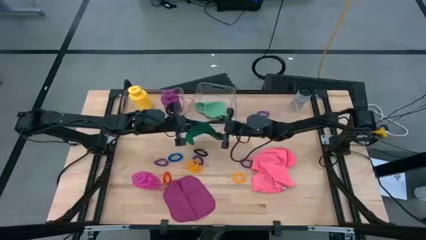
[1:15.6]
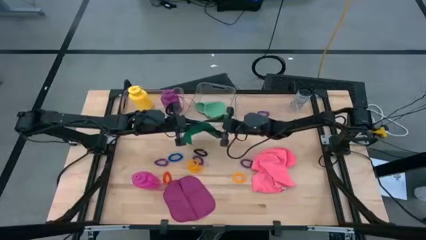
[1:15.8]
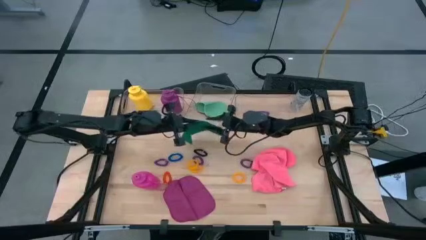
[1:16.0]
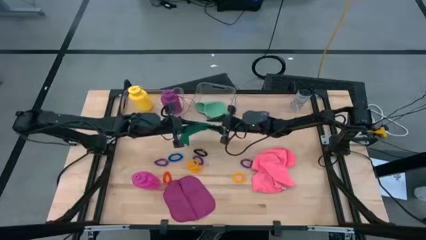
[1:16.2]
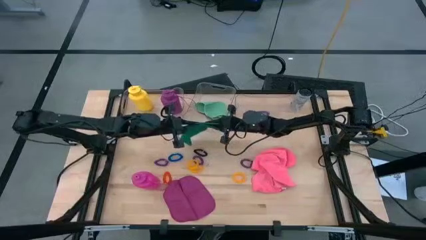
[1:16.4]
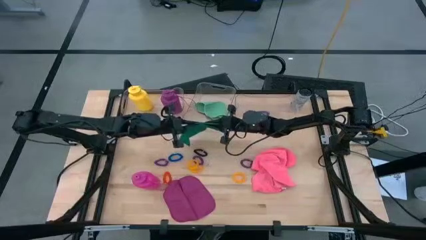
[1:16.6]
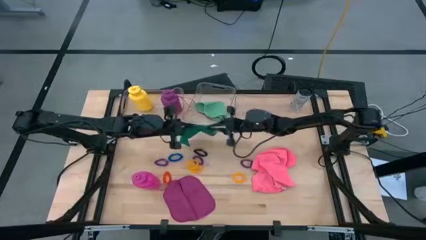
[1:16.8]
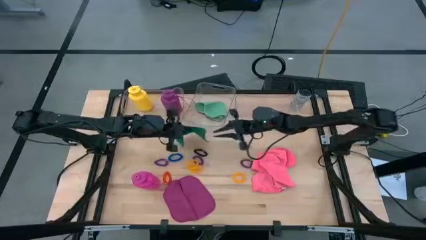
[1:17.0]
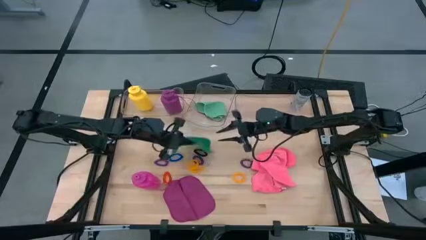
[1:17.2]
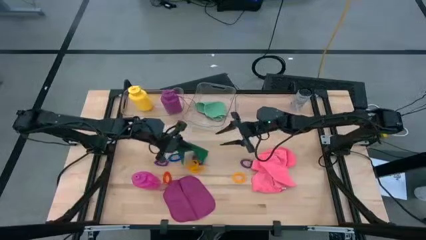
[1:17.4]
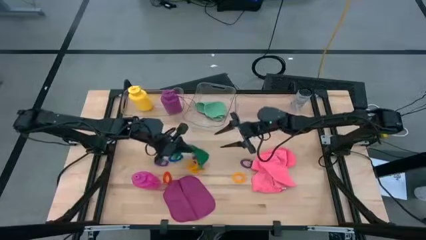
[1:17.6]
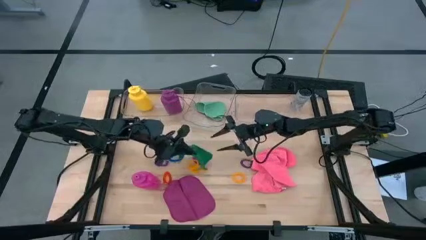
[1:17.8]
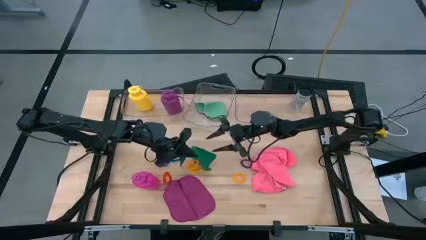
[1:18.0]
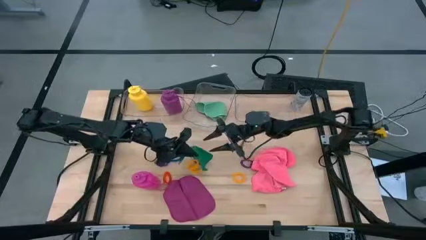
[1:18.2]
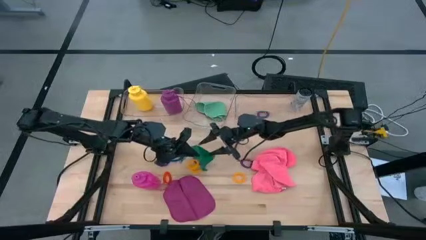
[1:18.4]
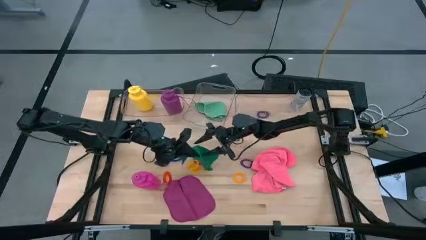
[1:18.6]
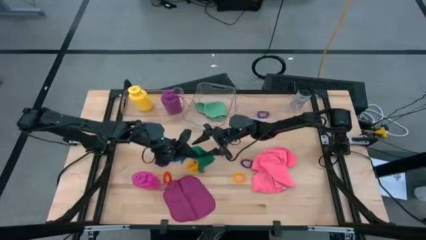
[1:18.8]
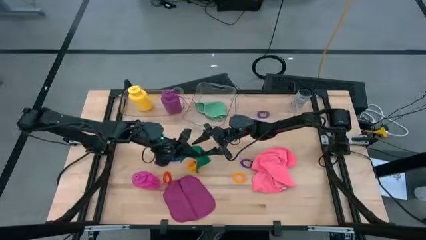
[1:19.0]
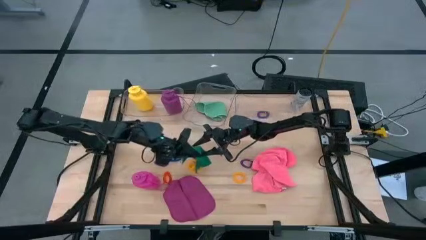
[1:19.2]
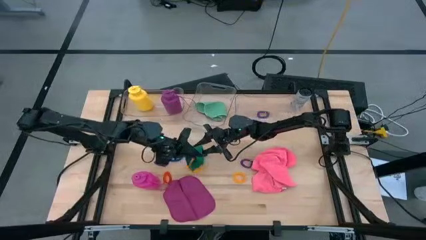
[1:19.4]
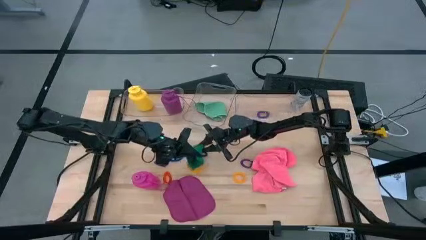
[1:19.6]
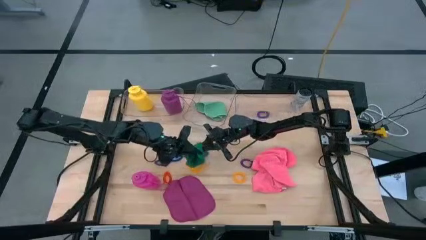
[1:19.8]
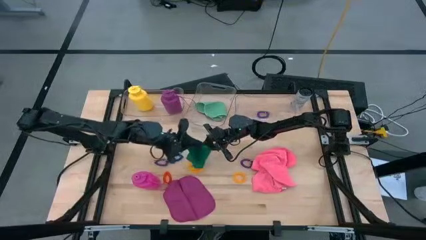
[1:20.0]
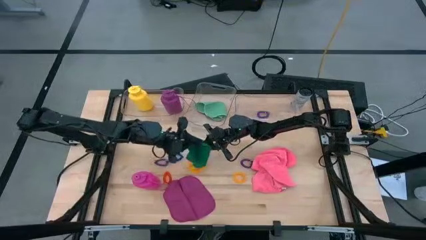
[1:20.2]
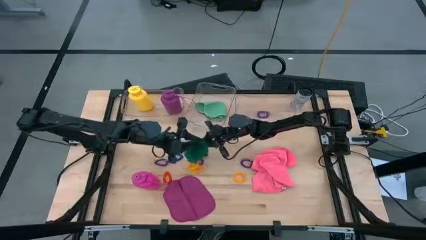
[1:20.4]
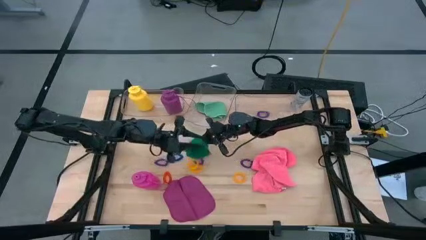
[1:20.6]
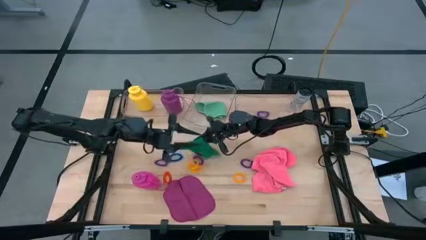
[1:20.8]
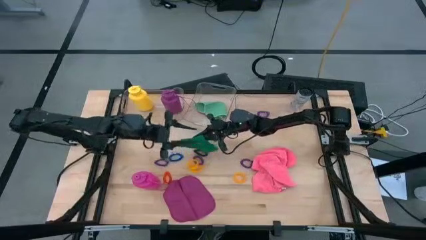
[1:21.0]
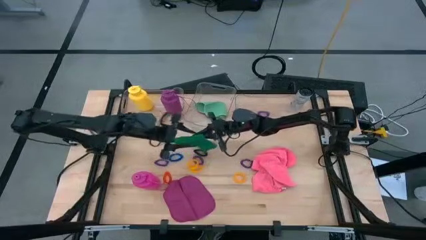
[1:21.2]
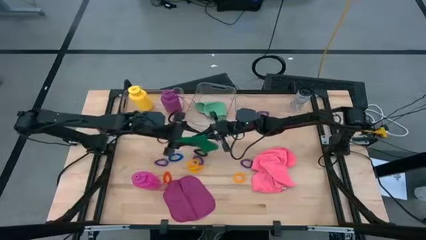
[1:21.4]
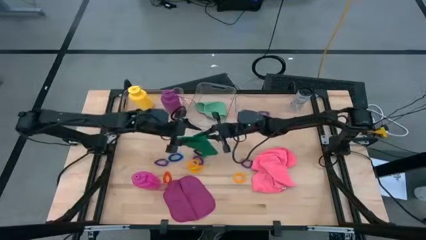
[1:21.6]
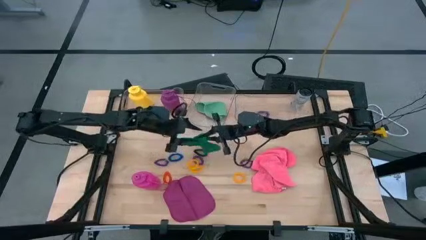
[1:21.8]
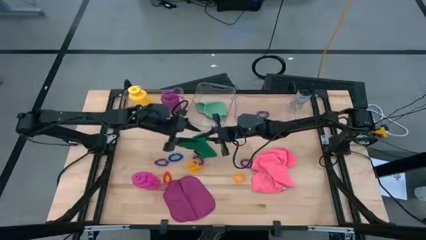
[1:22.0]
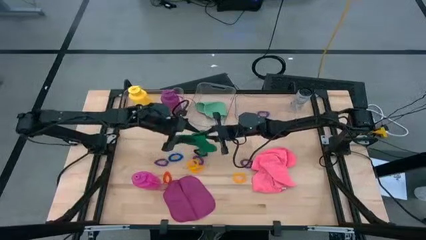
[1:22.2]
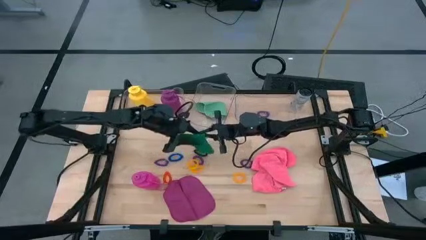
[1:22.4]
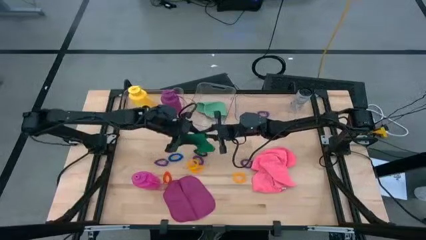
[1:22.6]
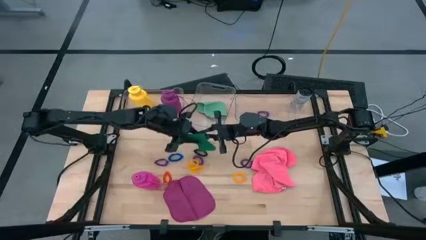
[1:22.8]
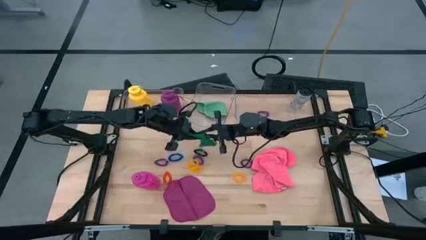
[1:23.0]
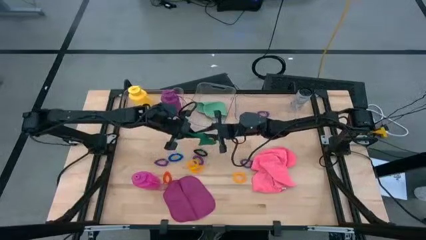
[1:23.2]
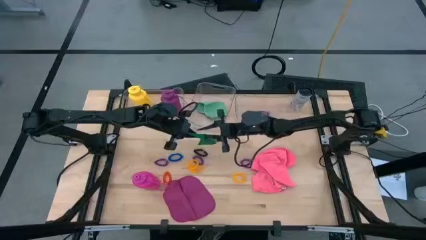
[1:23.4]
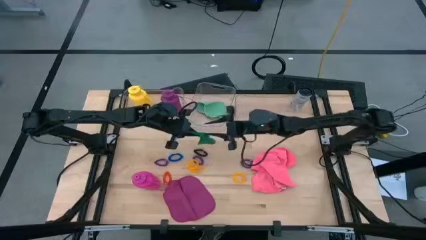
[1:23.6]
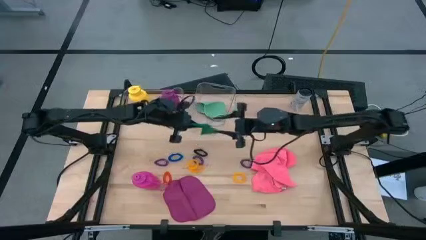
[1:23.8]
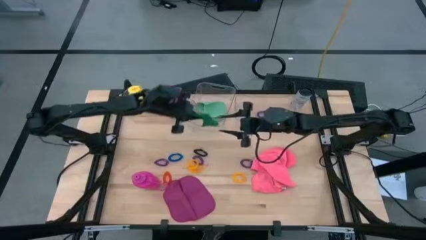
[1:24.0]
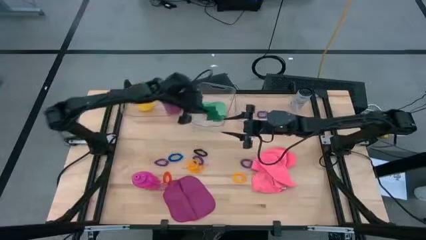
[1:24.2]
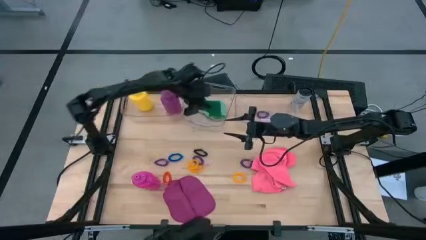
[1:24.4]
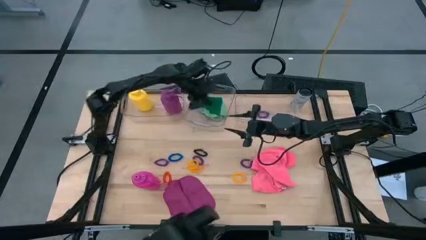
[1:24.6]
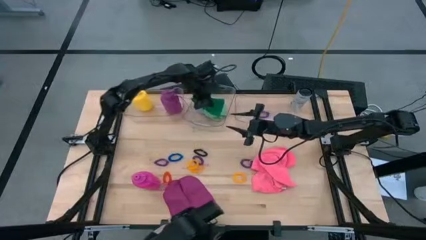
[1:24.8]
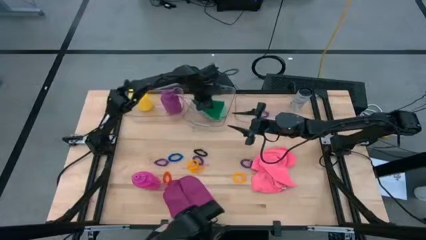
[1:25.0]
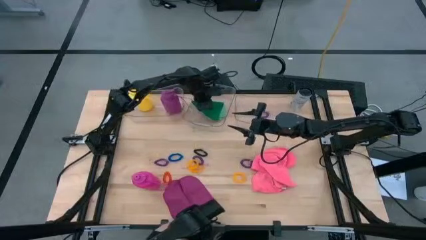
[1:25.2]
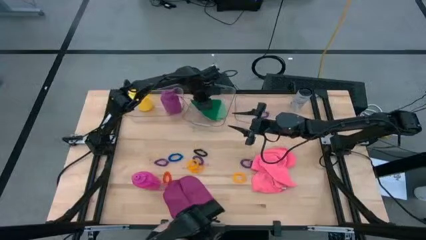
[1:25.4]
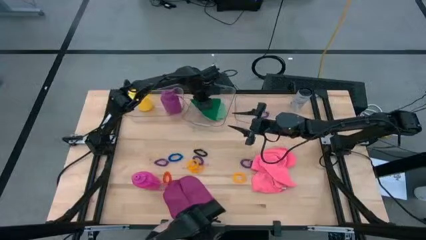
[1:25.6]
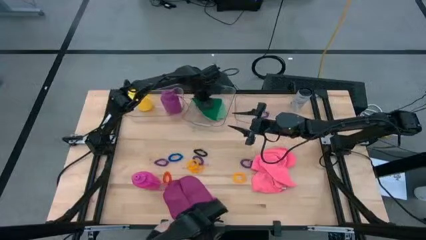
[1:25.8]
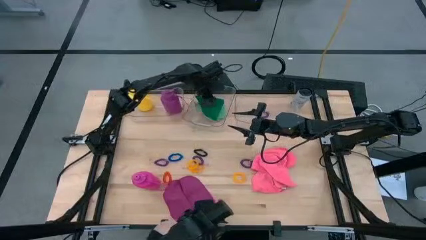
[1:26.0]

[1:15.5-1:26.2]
Task: Pick & Place Sports Items
Put the green microfiber towel into the middle transparent bin

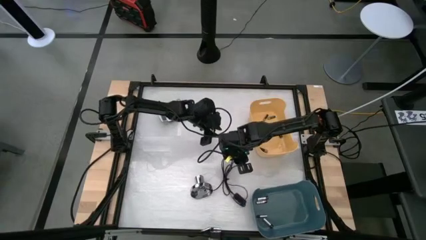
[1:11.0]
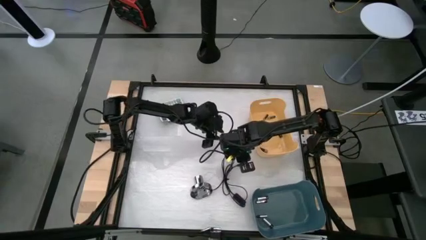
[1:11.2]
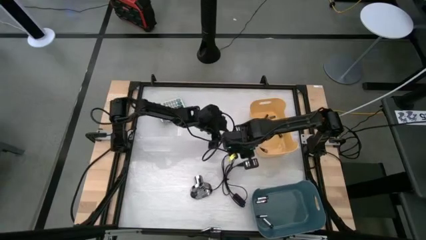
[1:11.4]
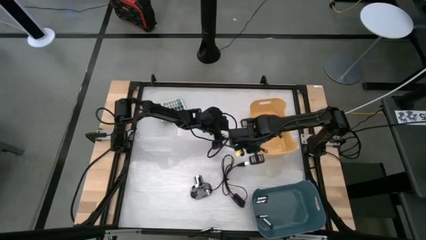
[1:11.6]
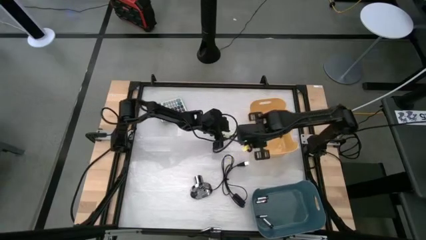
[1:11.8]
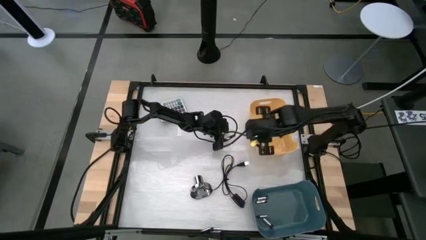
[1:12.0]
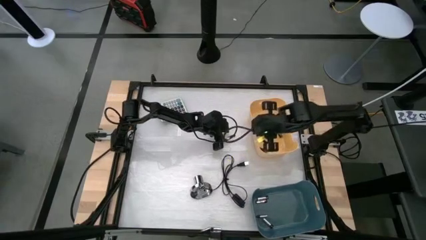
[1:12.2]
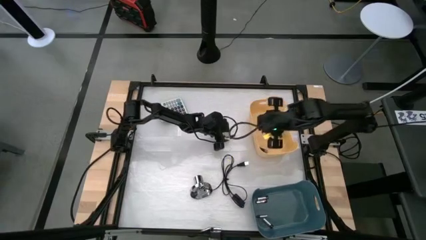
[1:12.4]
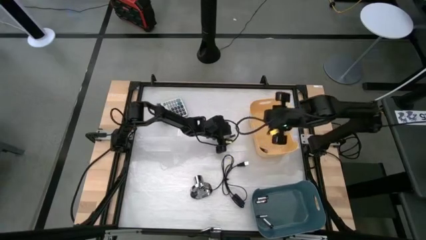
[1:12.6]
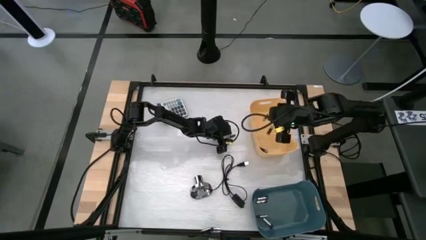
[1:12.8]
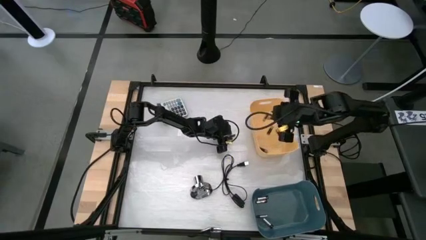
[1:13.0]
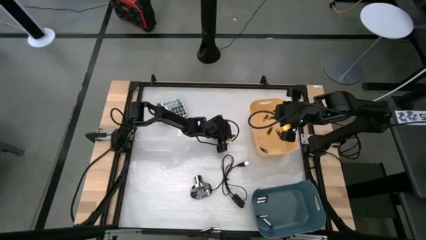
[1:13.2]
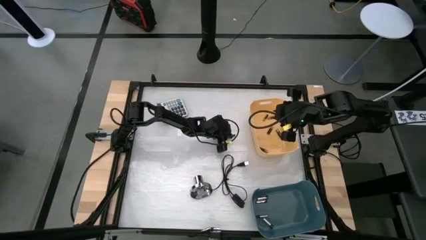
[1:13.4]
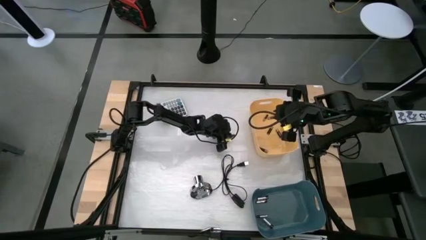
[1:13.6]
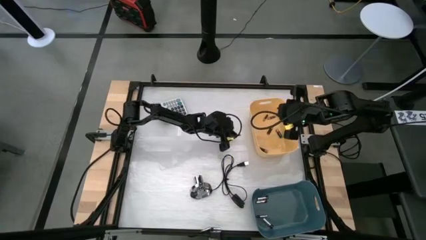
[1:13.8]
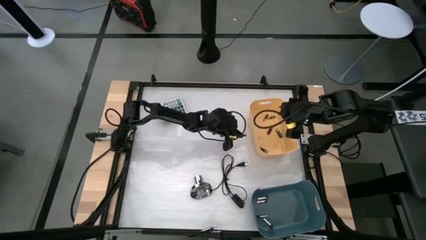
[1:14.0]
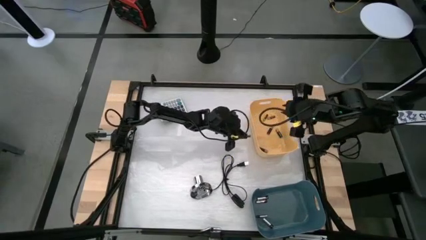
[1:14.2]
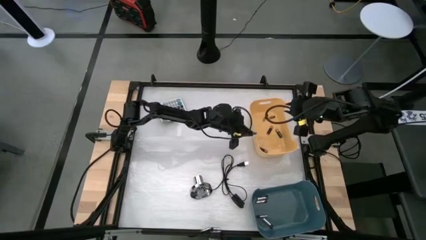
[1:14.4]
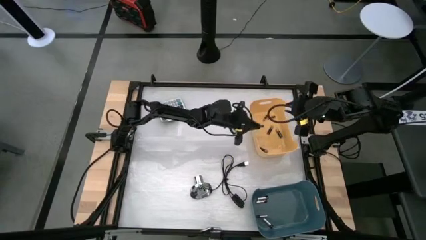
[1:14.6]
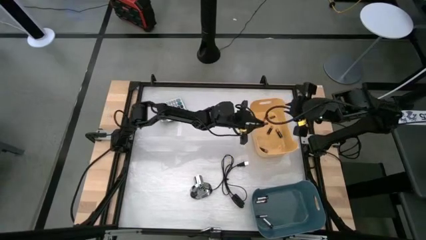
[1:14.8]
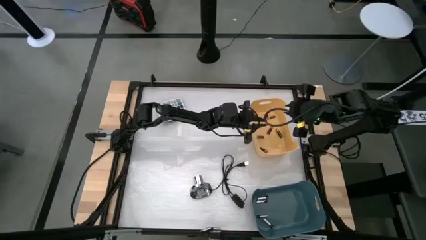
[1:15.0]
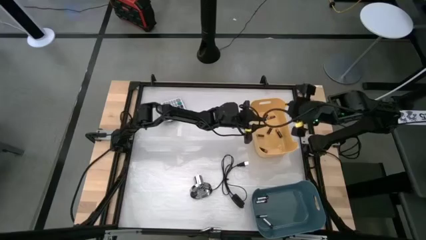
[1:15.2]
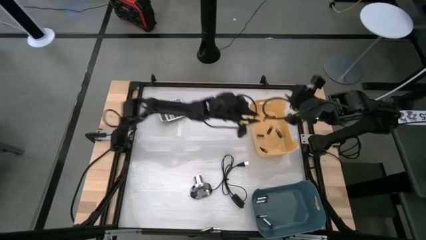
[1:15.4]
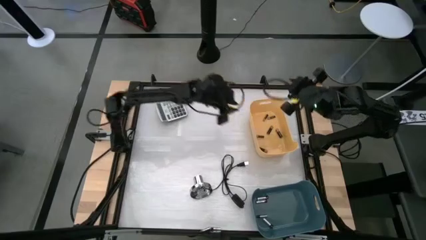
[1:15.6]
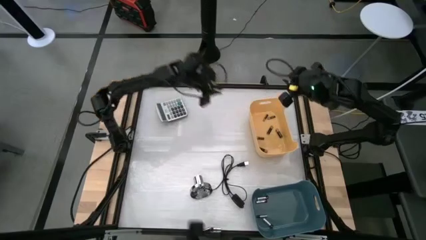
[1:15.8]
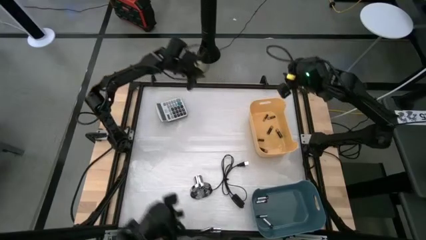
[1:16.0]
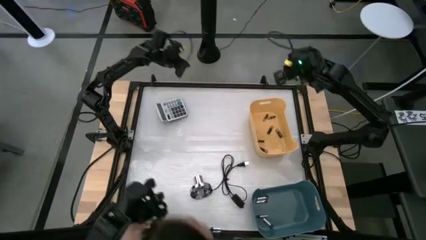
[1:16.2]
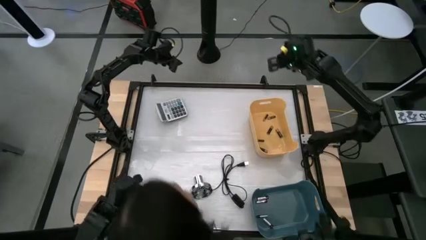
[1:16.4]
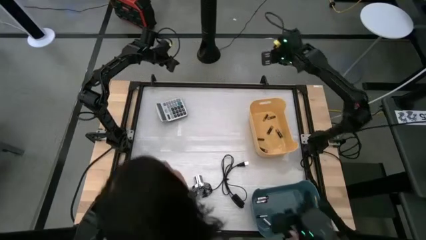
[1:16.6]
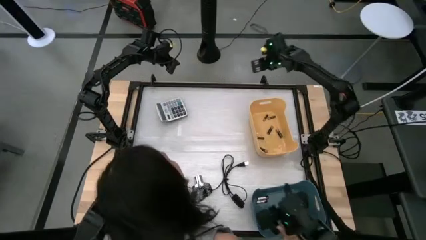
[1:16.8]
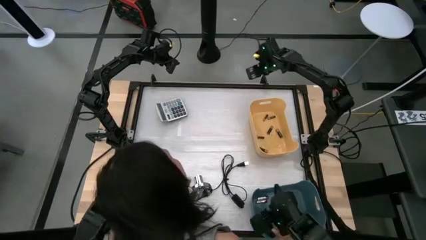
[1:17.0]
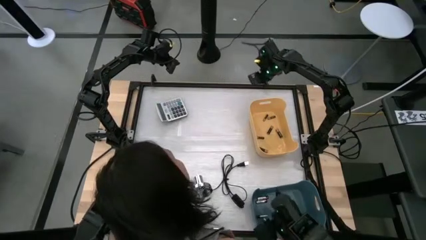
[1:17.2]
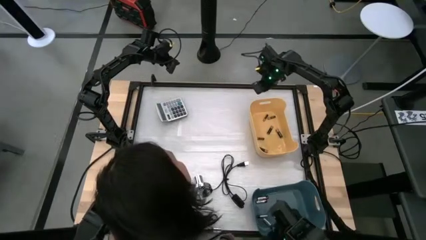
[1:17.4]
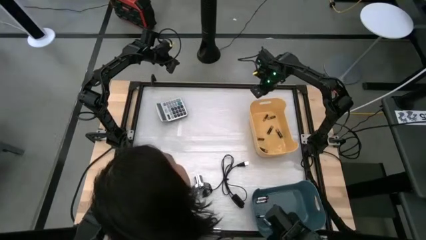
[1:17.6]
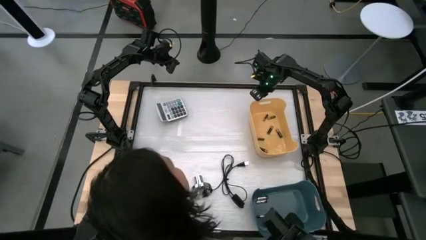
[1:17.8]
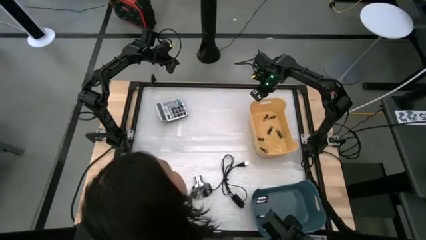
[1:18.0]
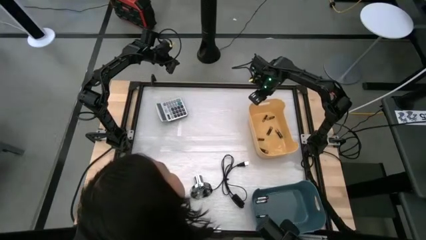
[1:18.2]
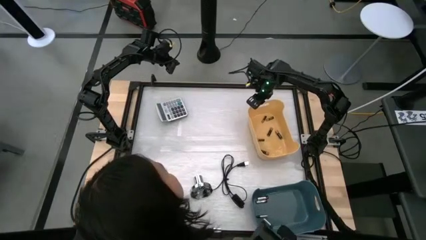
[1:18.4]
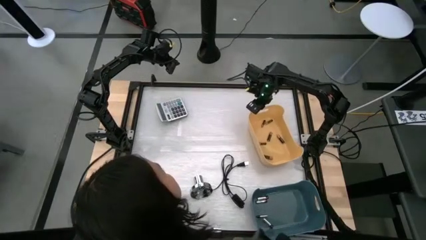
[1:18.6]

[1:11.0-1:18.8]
Task: Sort batteries
Put the black battery into the yellow bin
